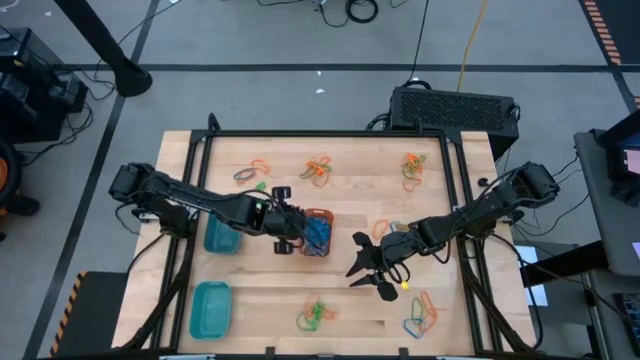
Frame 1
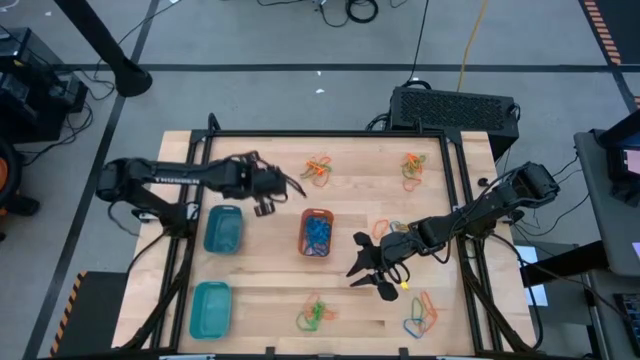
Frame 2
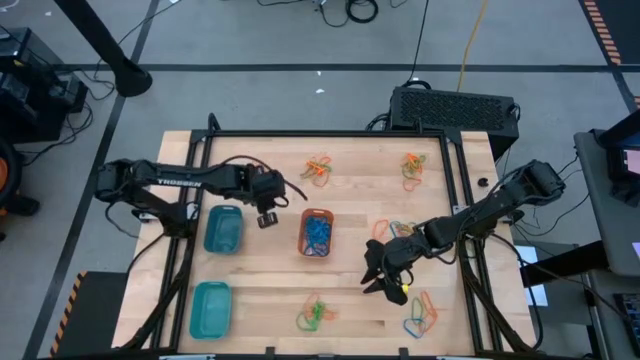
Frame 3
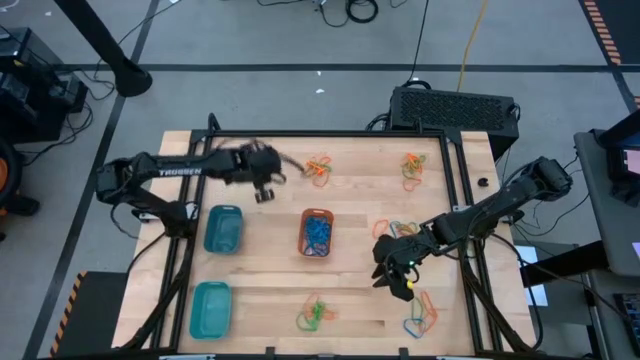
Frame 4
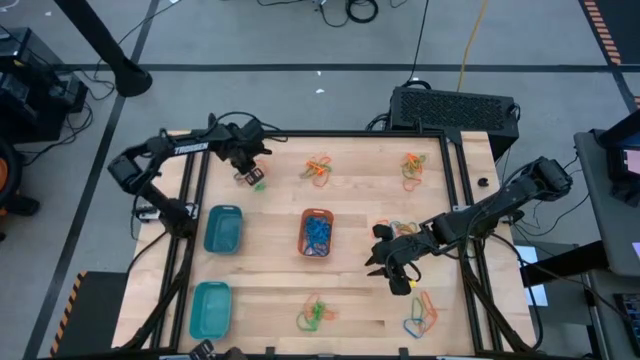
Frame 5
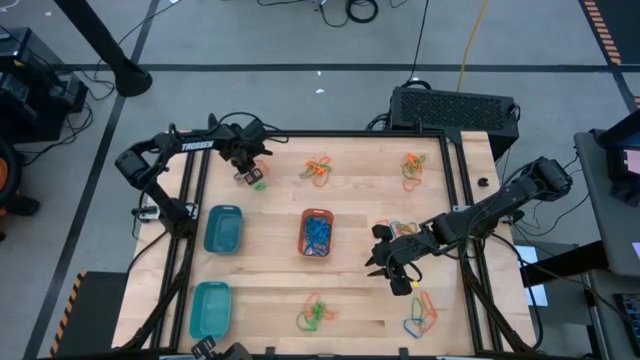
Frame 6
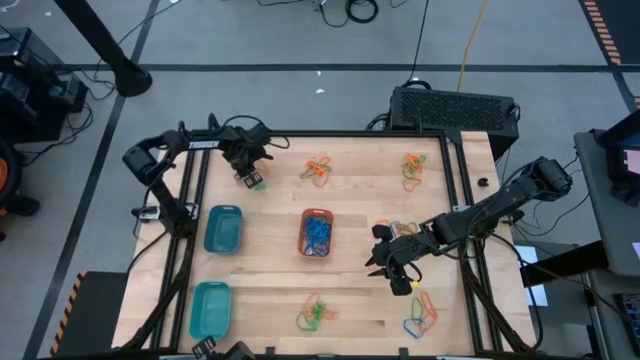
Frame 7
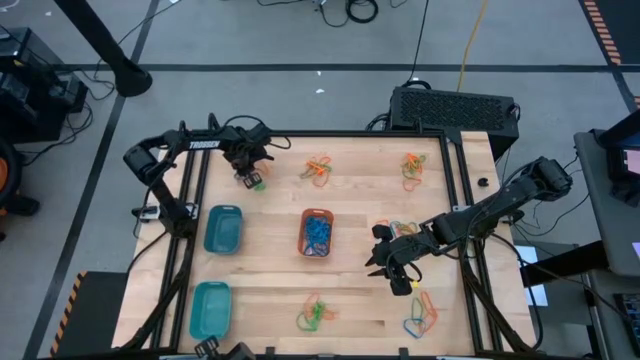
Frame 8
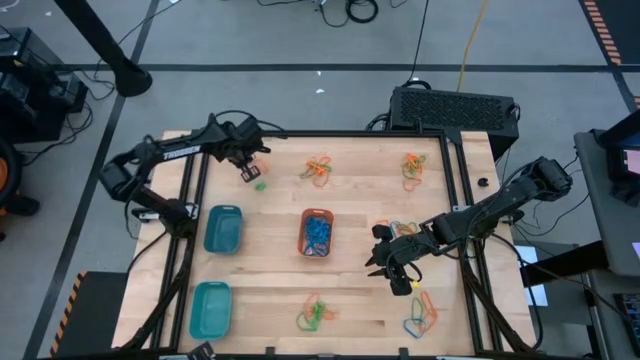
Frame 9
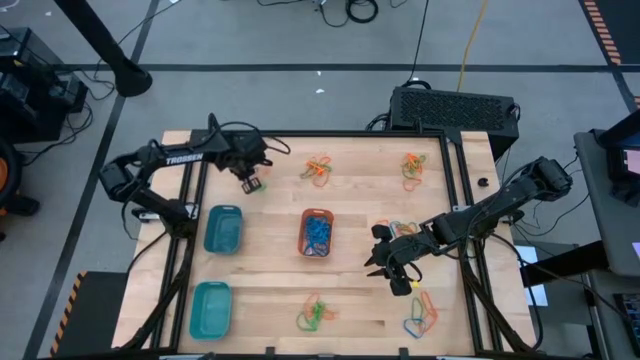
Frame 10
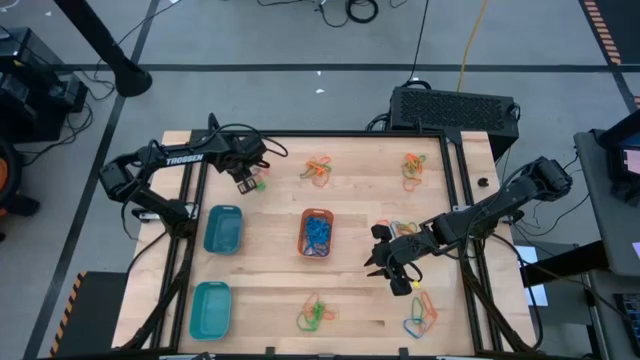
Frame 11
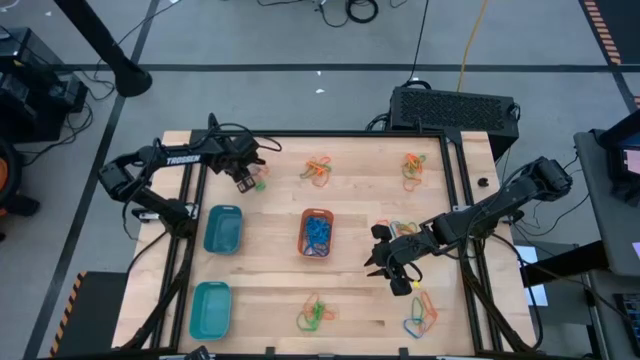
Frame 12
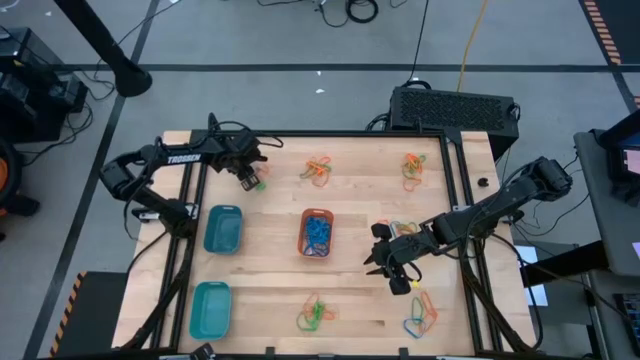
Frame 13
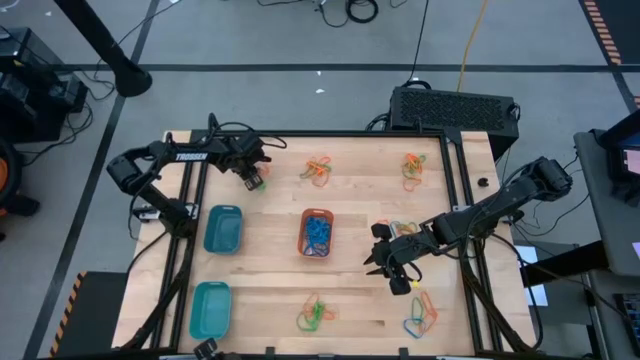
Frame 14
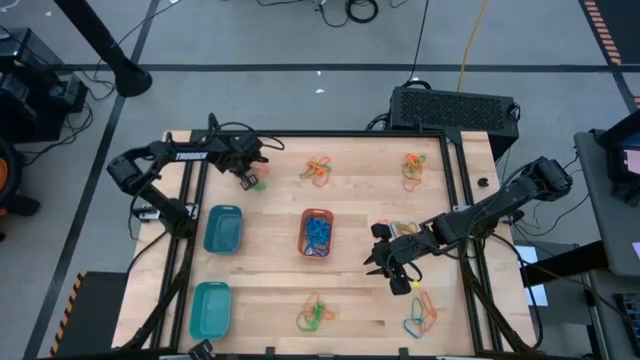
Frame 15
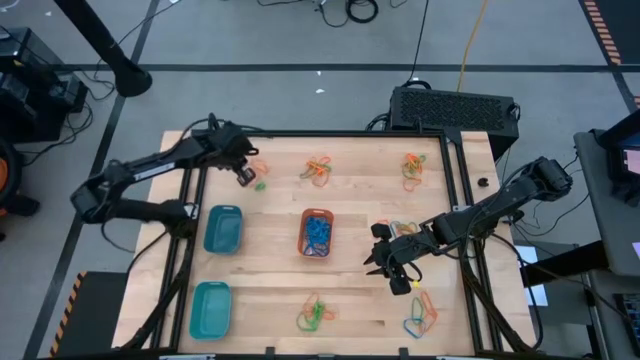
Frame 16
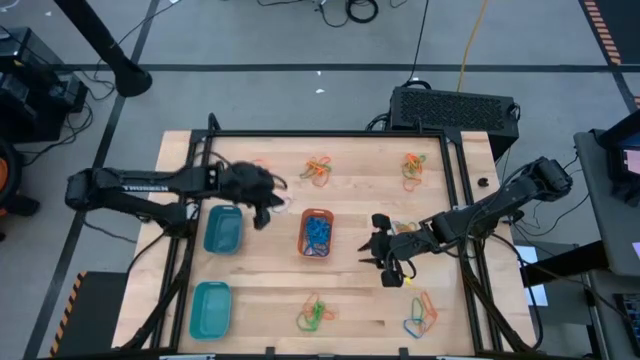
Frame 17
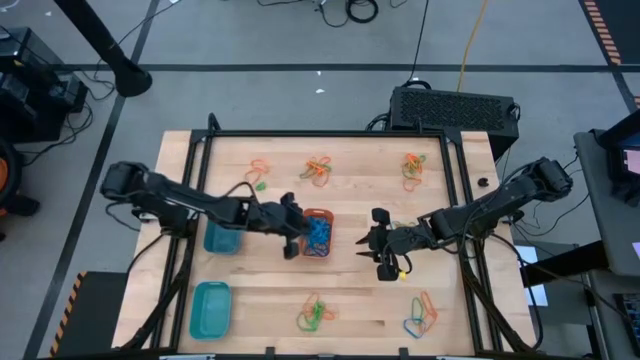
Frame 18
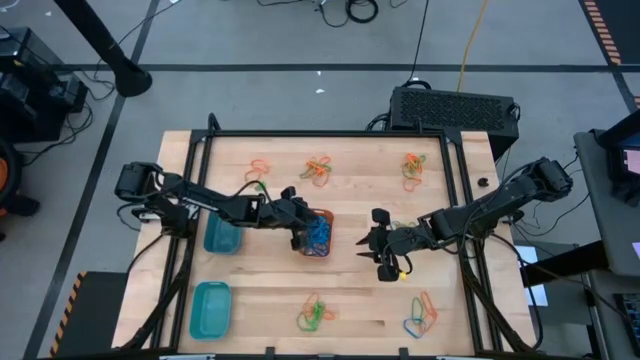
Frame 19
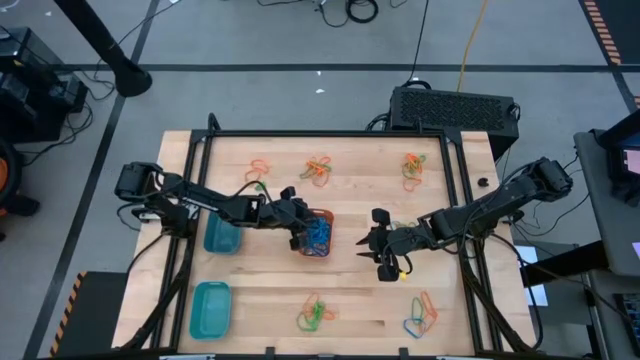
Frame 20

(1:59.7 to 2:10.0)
Task: Sort rubber bands into baskets
Put the blue rubber band into the orange bin

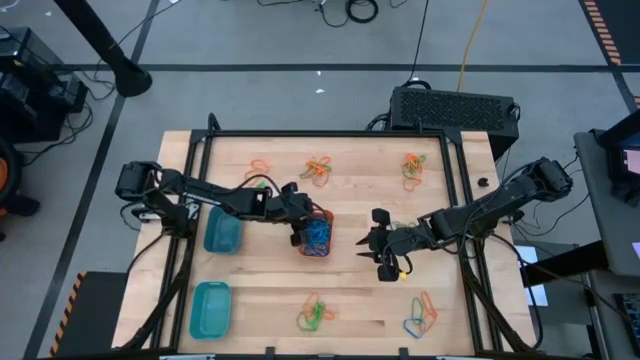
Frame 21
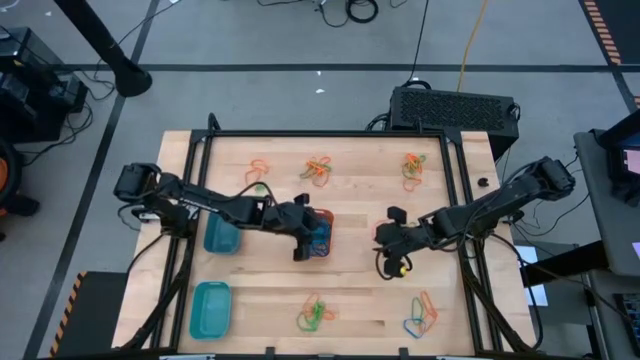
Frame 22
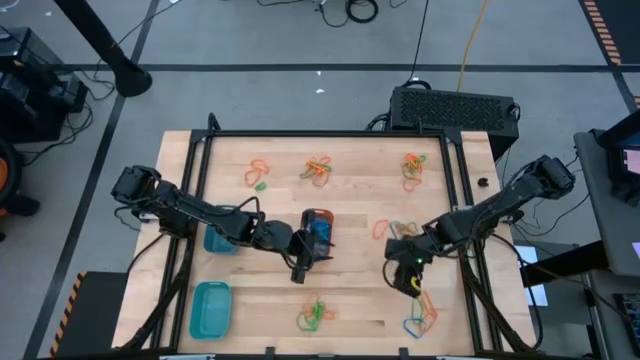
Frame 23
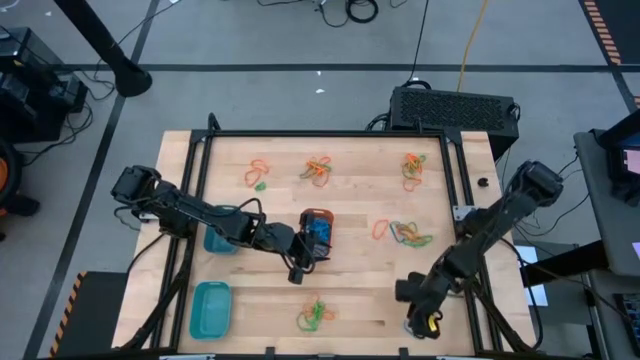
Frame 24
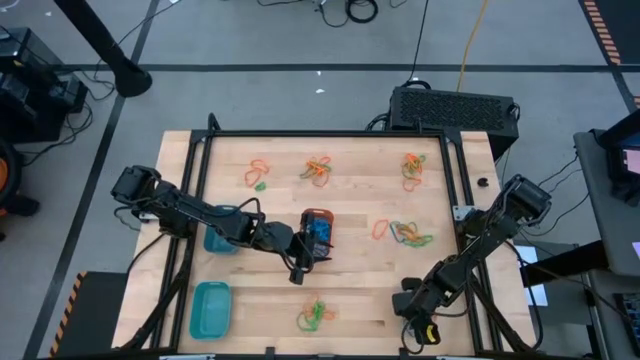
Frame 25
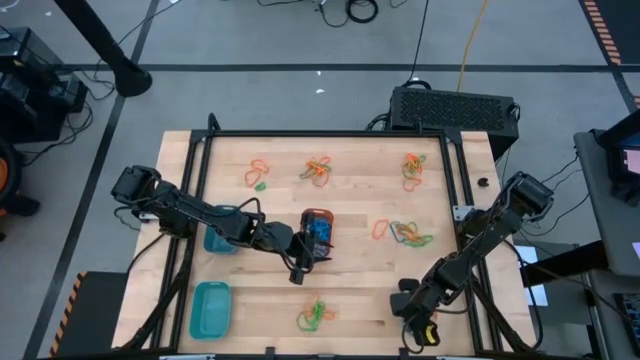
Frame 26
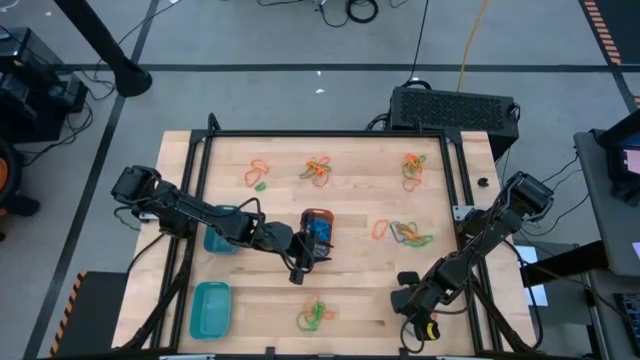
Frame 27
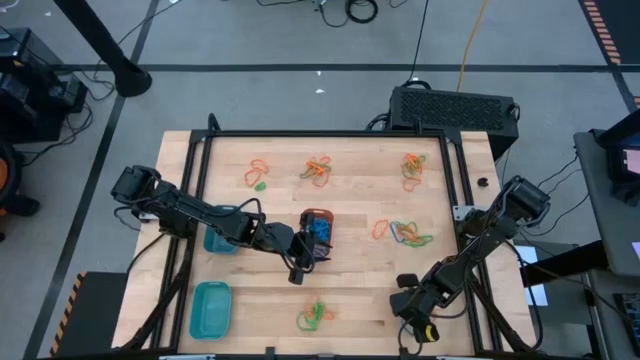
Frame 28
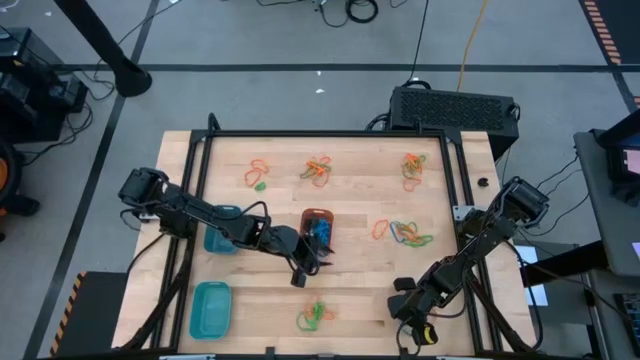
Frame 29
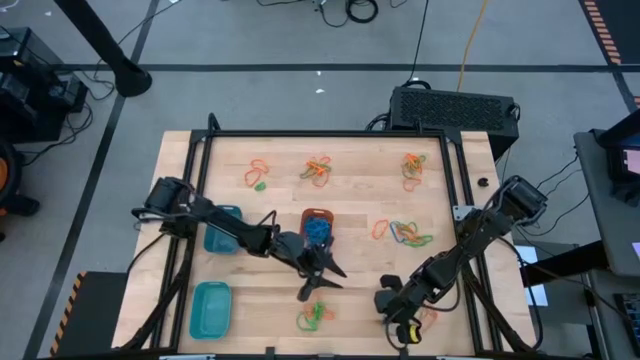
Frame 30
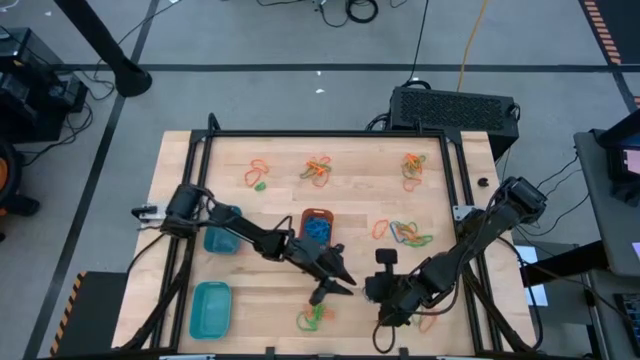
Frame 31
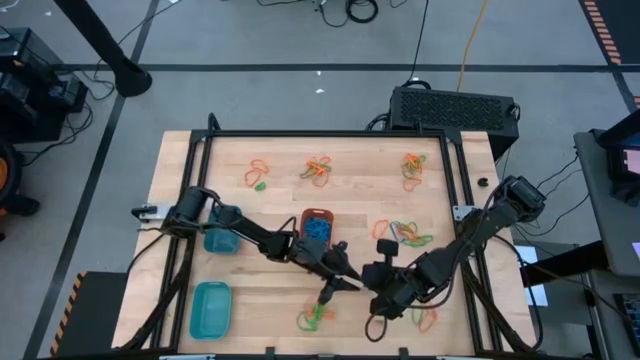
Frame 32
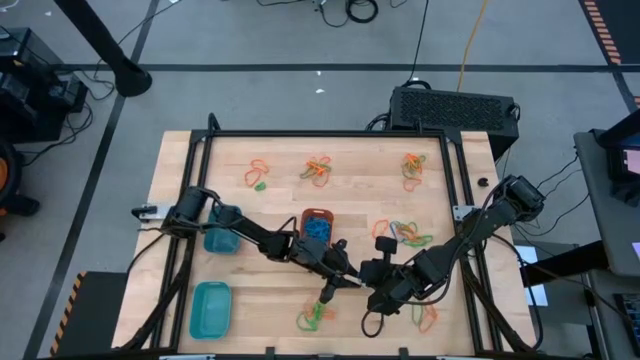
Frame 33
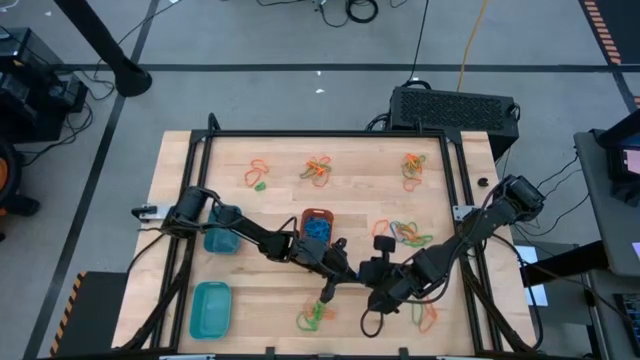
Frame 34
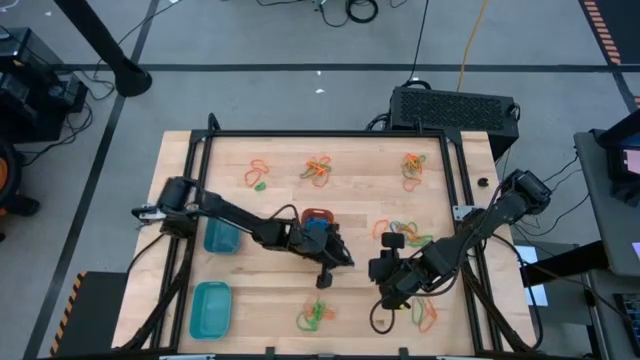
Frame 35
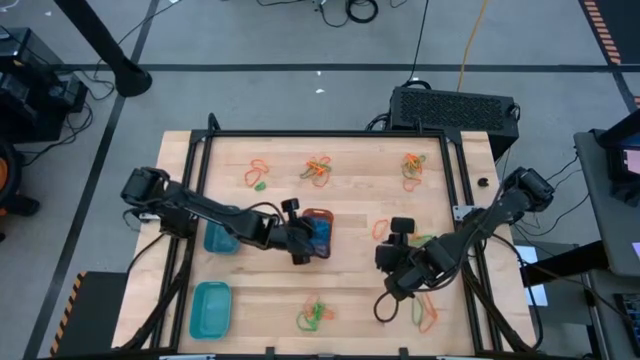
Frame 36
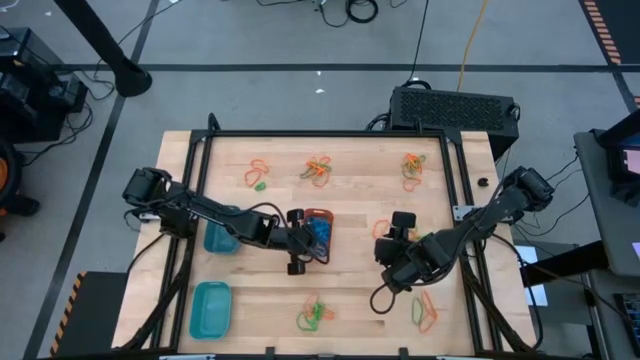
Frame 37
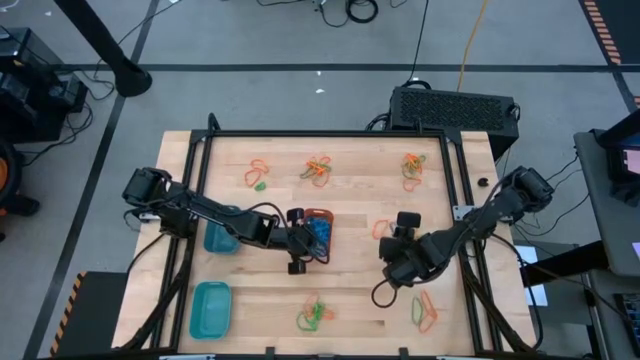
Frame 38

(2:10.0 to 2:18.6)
Put the blue rubber band into the orange bin

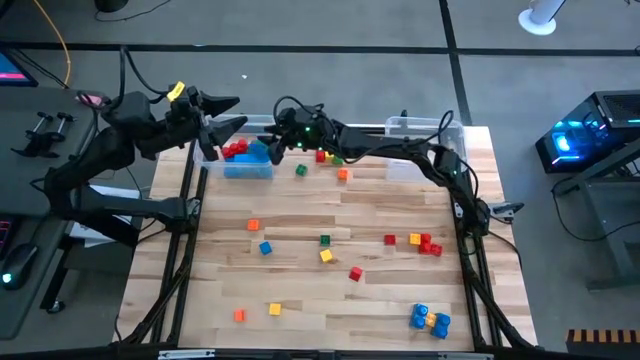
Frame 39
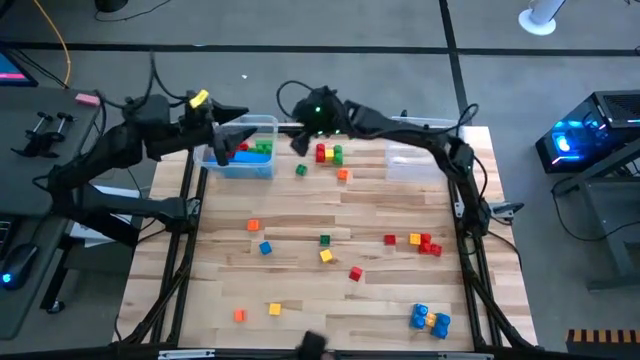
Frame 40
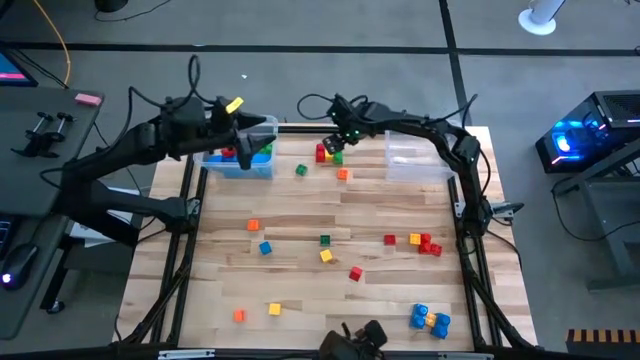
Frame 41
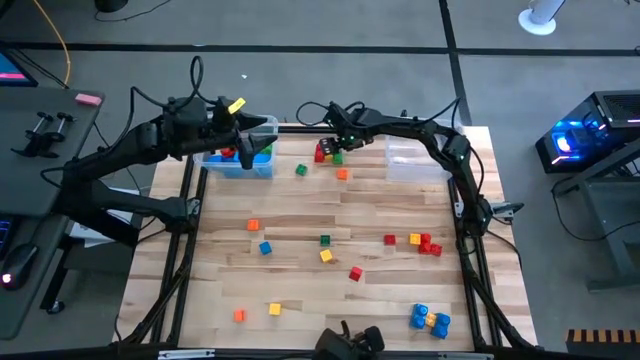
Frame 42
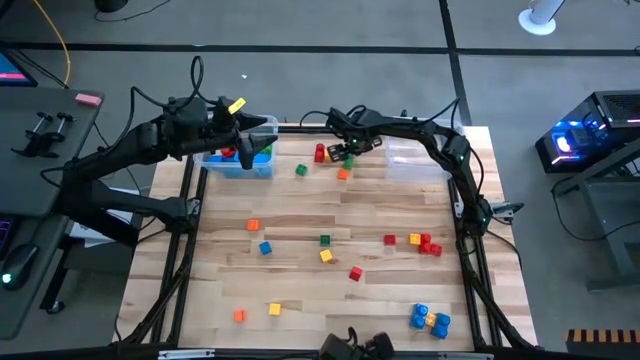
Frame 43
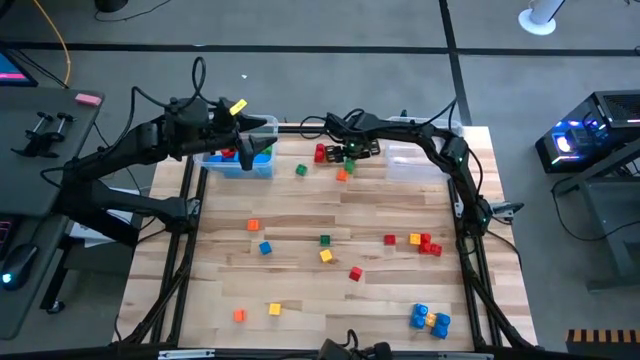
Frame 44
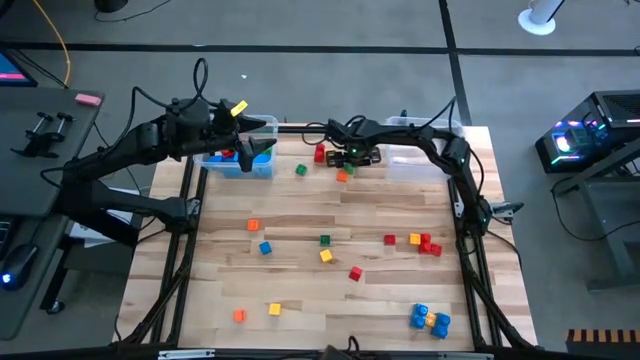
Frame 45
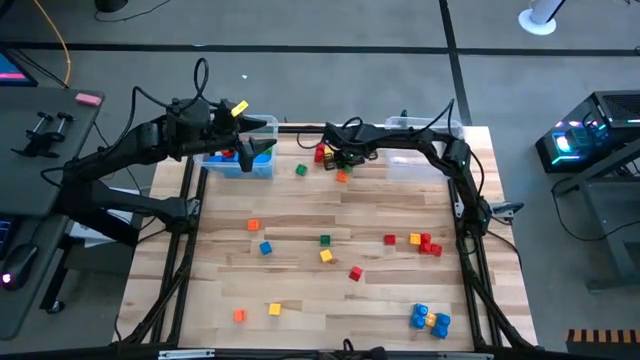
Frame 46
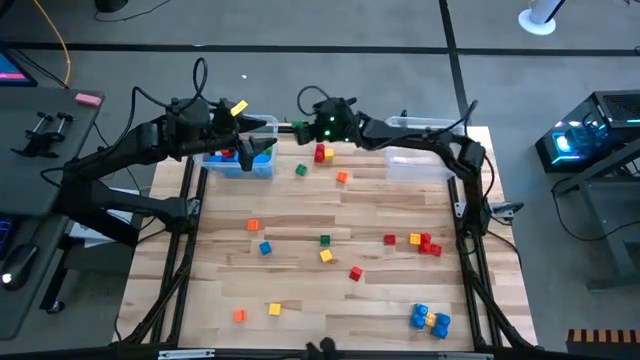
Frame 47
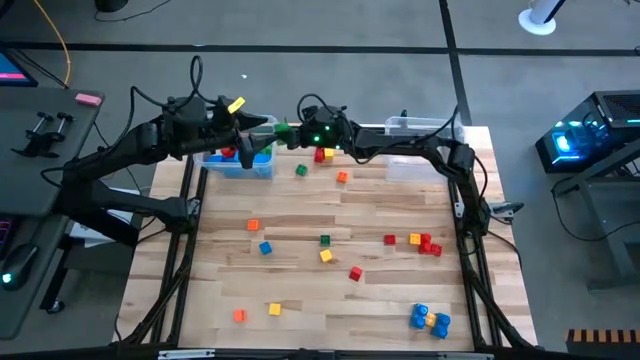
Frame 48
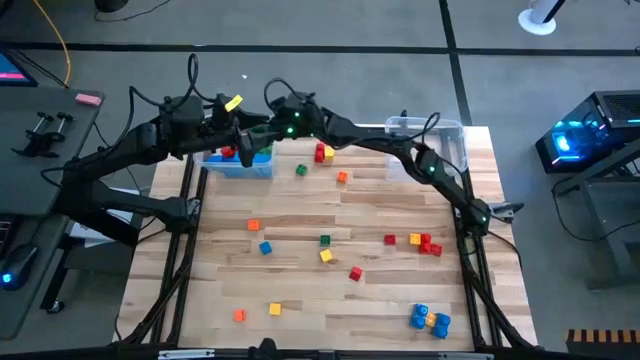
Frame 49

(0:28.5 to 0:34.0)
Task: Sort blocks by size
Put the large game piece into the left transparent bin
